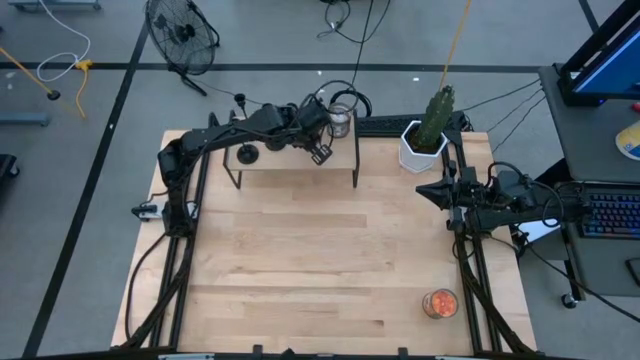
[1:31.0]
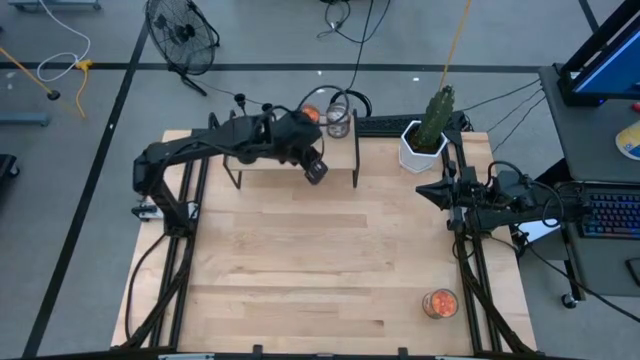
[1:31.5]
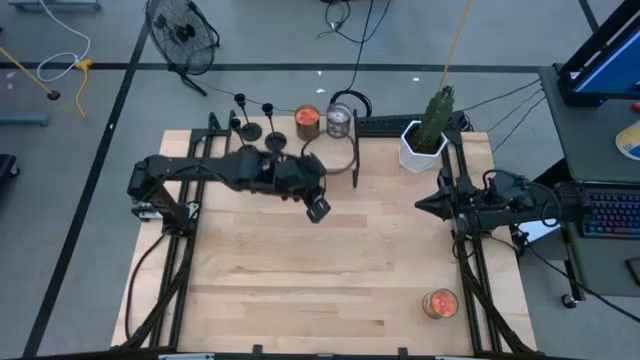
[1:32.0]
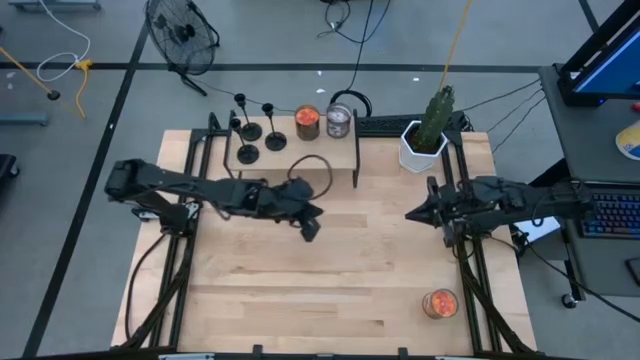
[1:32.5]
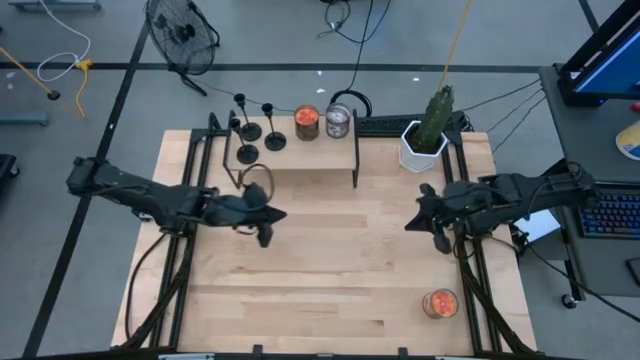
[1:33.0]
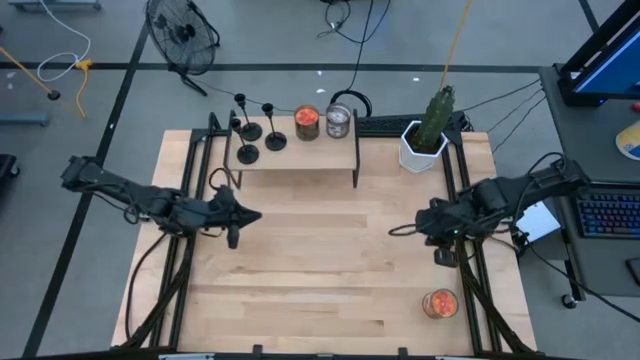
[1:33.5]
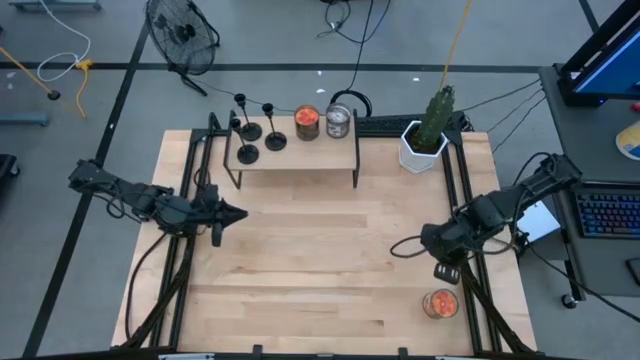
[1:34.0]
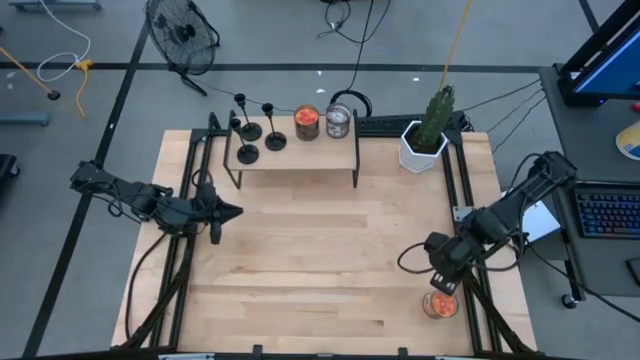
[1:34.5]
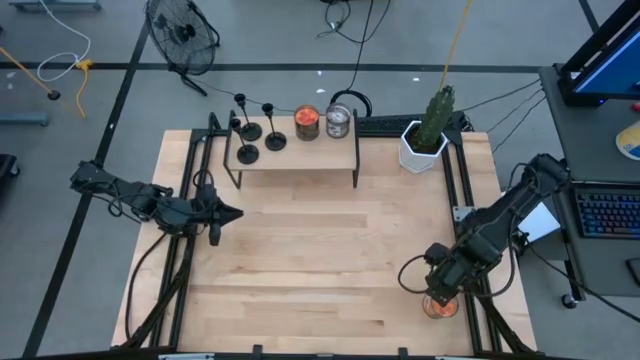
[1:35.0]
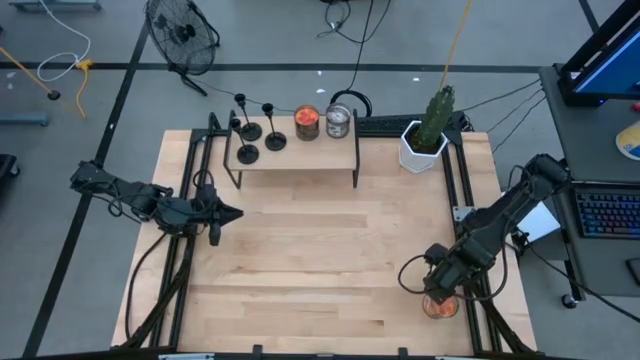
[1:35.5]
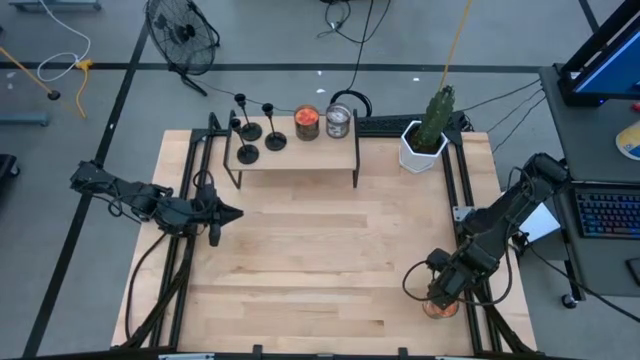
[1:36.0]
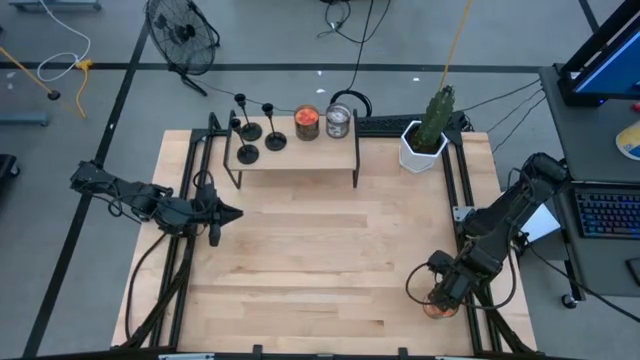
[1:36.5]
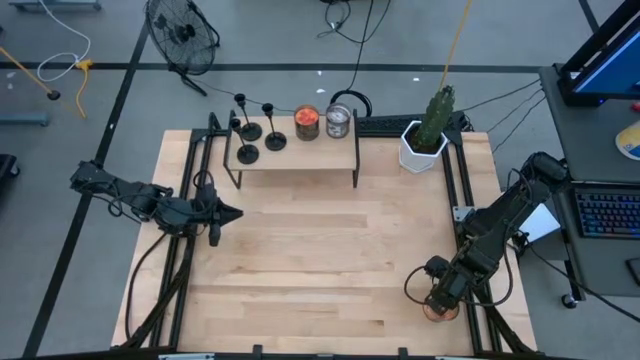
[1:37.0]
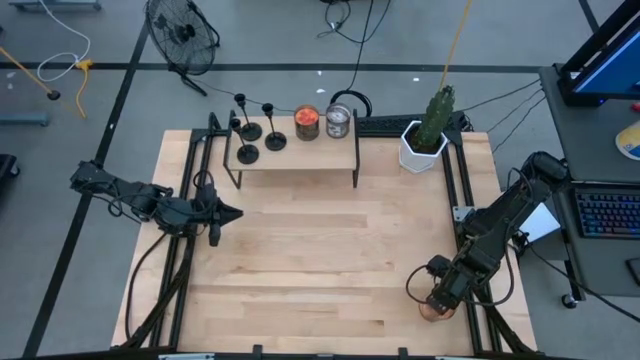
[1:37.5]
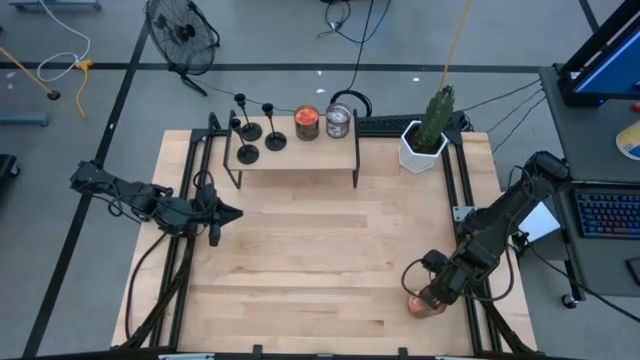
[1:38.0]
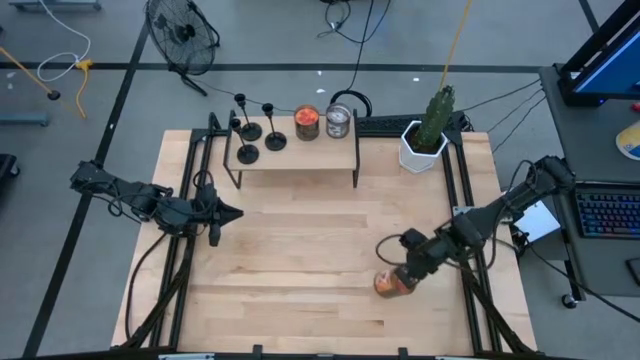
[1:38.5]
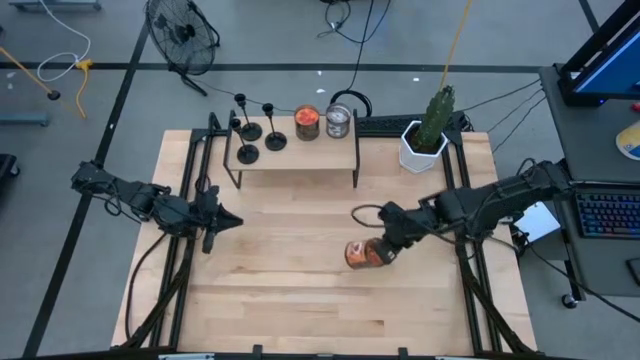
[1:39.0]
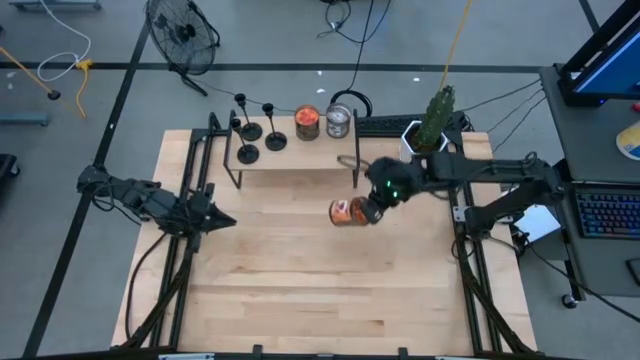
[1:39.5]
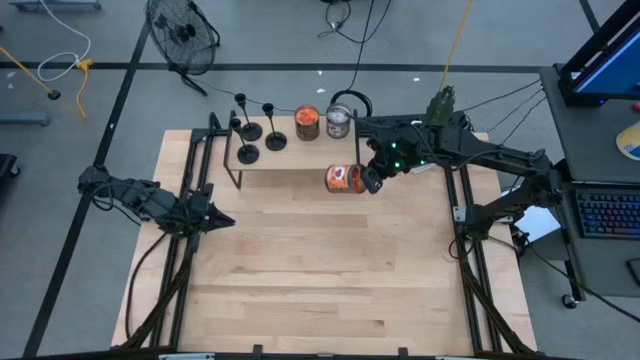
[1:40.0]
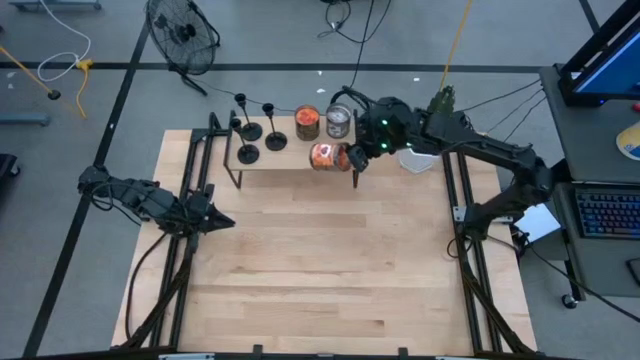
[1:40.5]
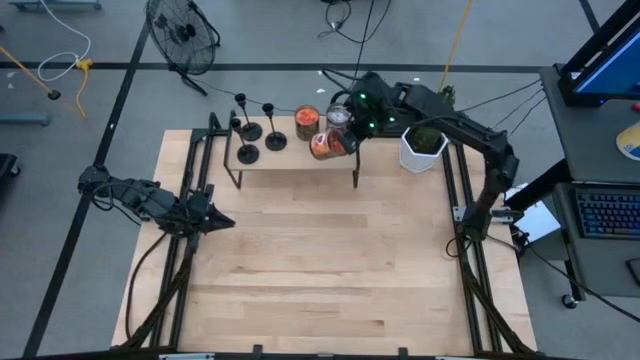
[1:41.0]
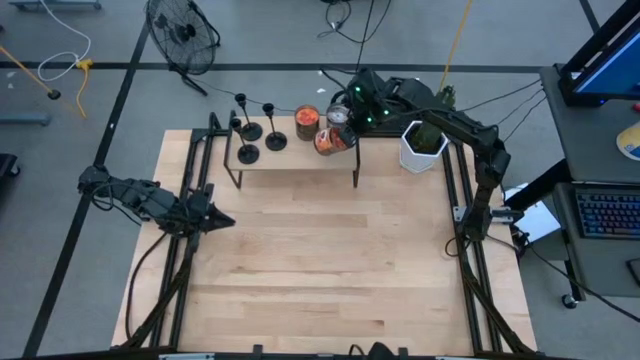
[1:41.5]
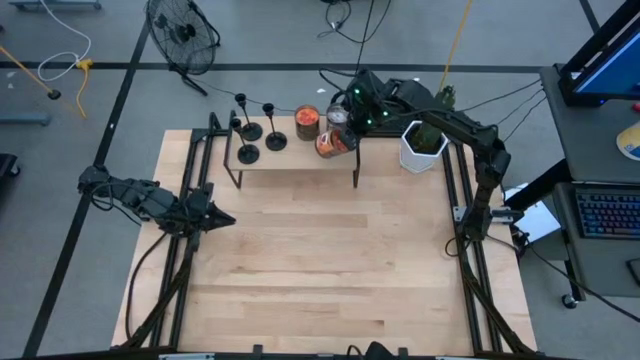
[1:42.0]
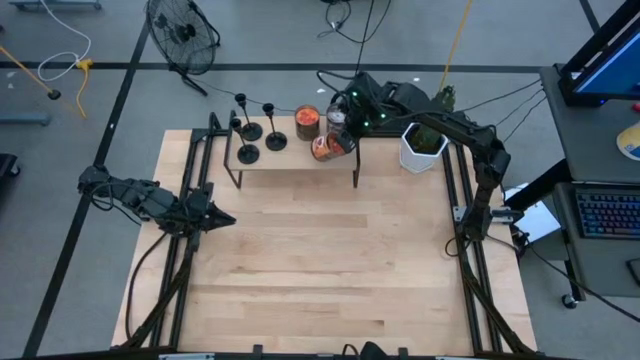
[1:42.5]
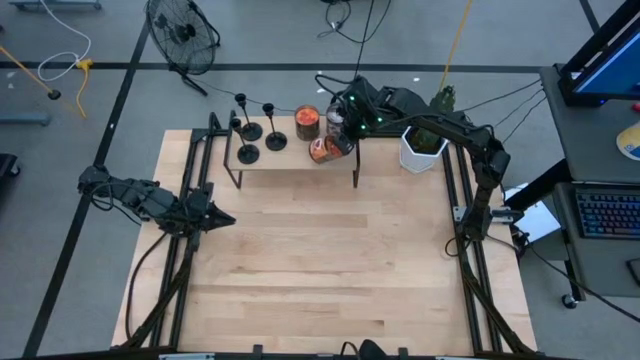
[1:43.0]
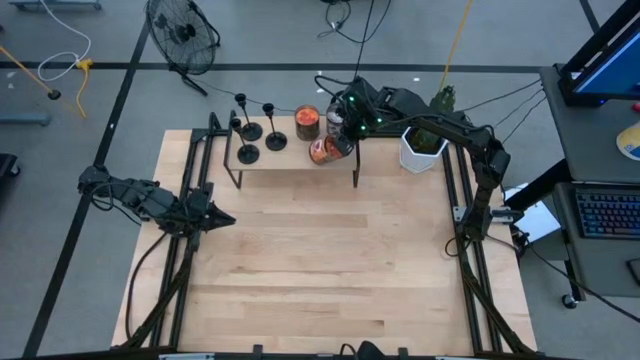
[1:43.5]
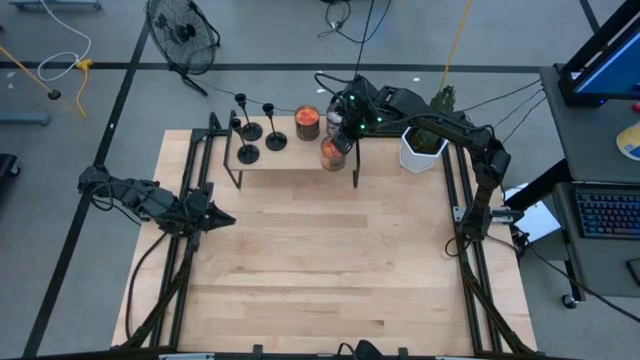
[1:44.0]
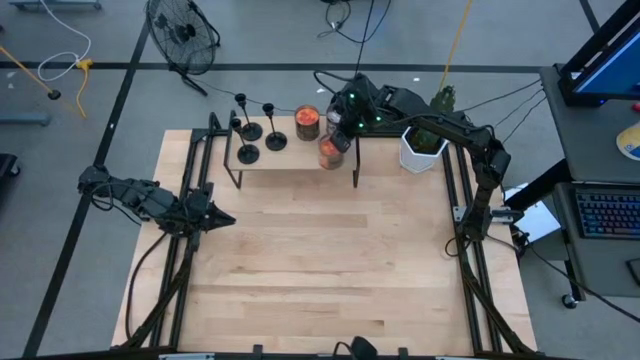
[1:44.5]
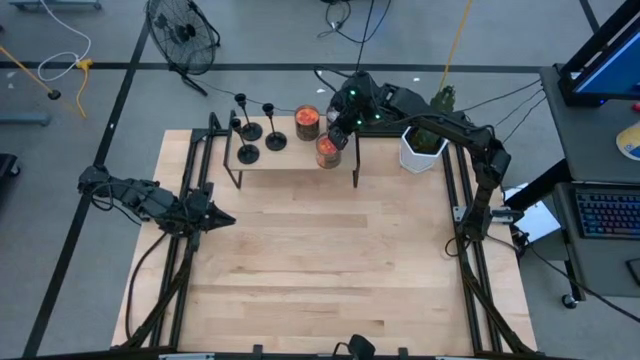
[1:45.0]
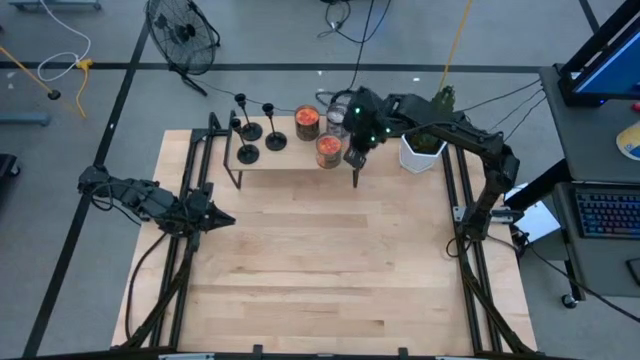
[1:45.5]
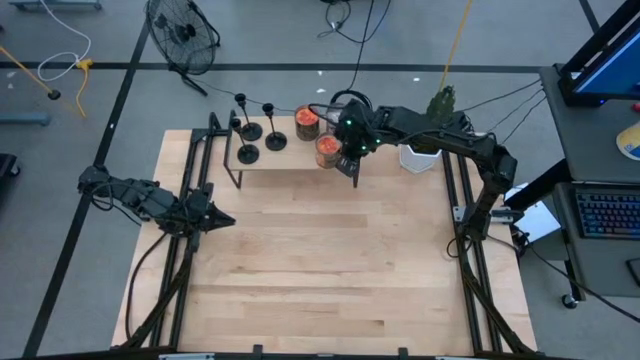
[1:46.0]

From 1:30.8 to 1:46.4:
Task: Pick & Place candle stick holders
Put the orange scented candle on the shelf

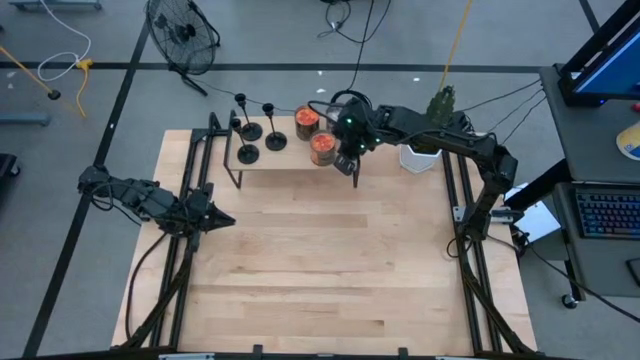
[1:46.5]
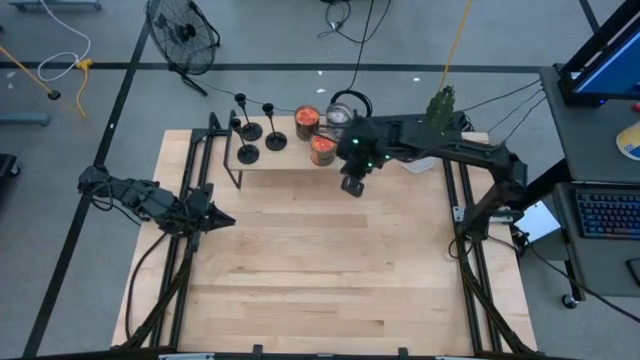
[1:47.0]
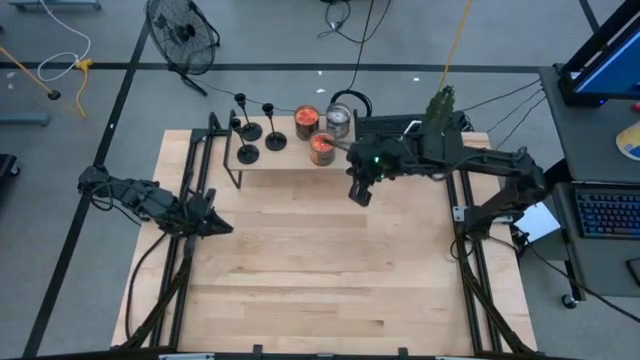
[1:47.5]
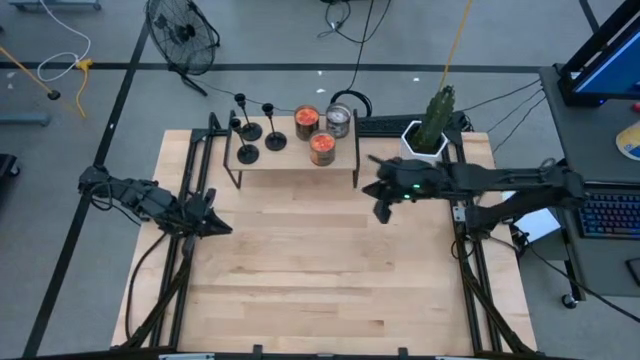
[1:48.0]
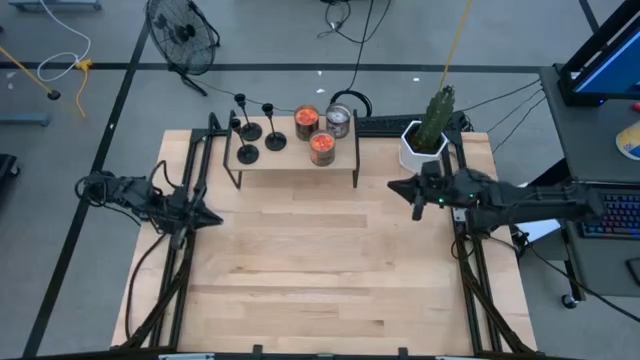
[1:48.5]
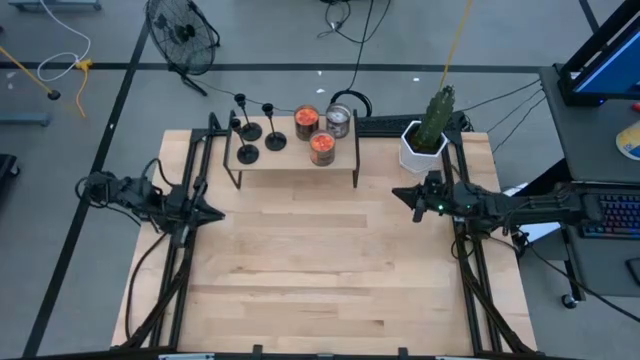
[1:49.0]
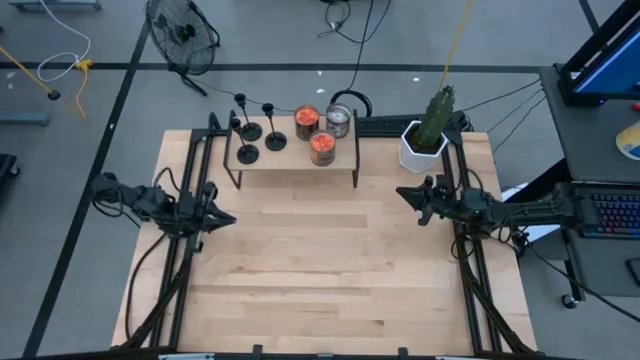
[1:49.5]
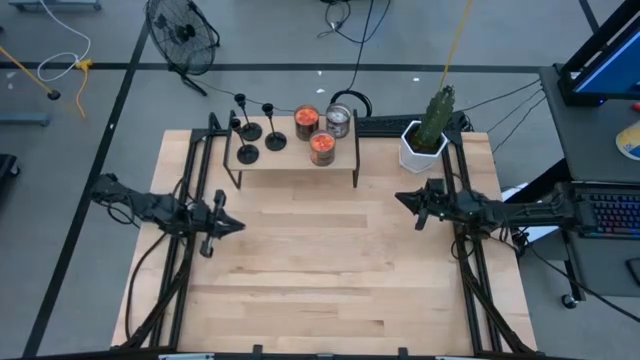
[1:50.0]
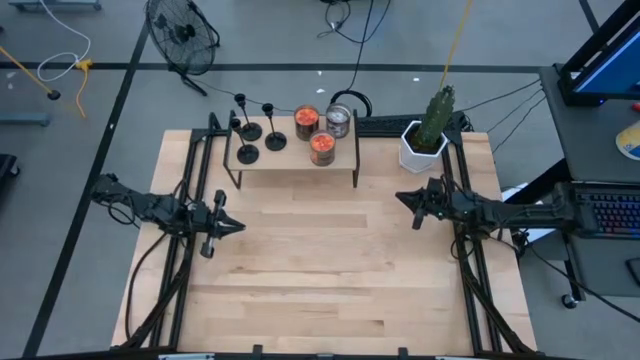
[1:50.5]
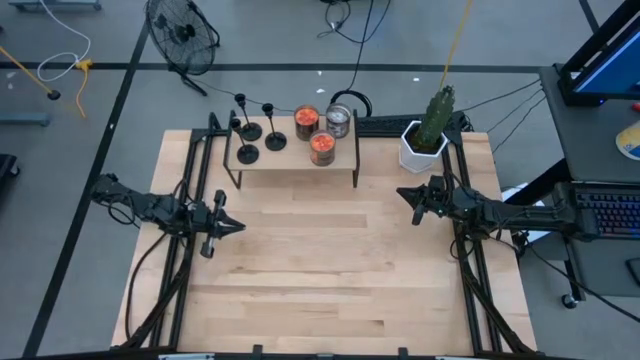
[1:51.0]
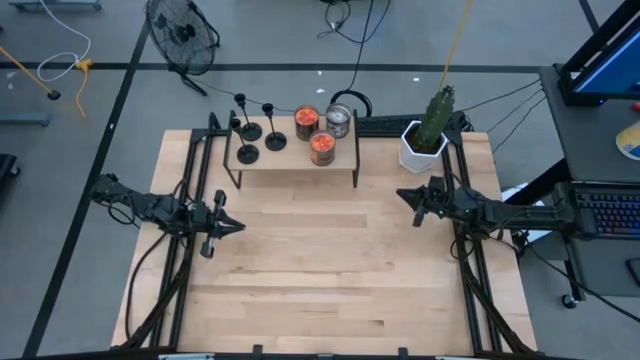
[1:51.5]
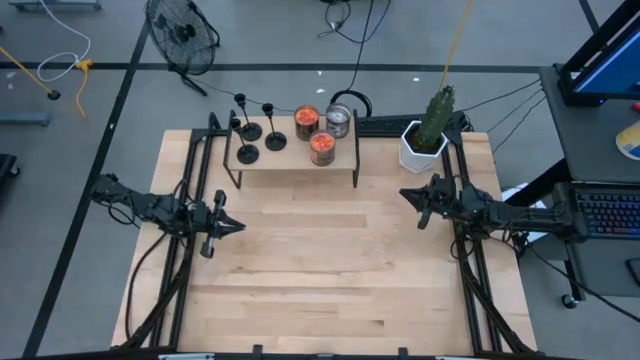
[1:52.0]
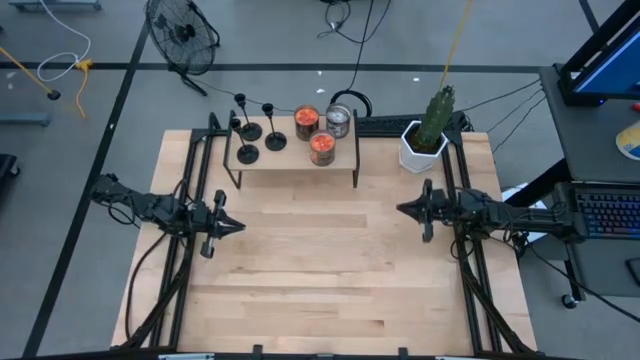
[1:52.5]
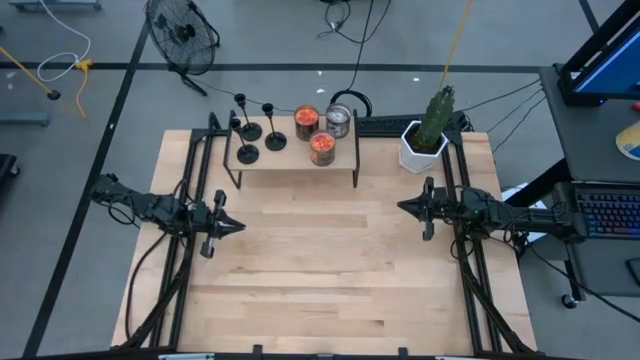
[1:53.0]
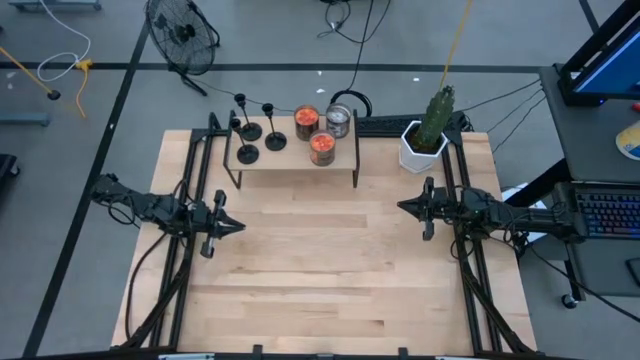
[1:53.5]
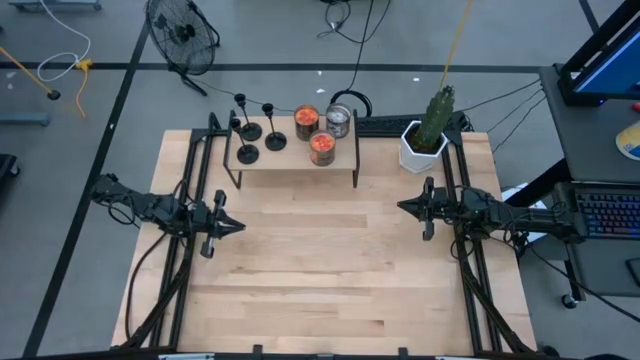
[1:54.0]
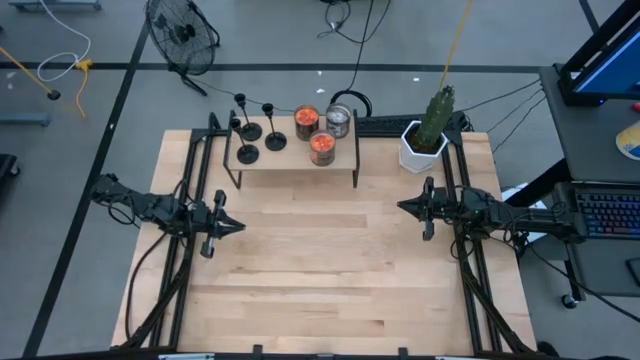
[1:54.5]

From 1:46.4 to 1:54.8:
Return to Home Position
